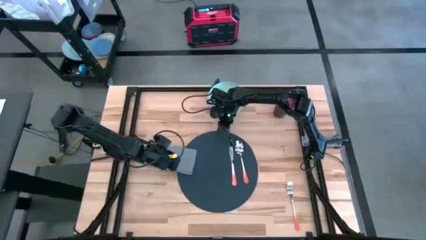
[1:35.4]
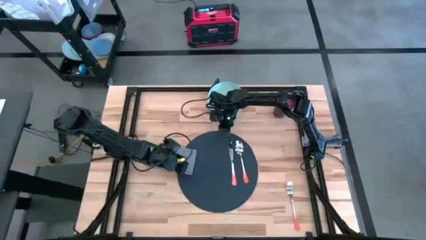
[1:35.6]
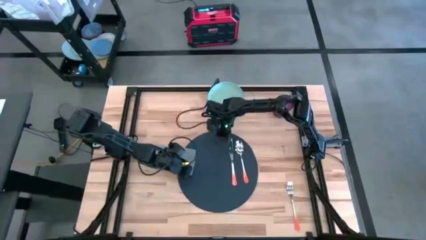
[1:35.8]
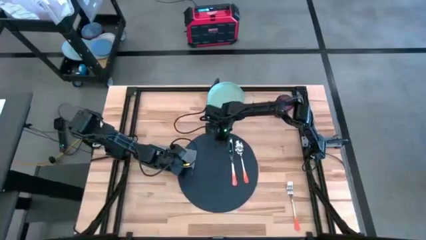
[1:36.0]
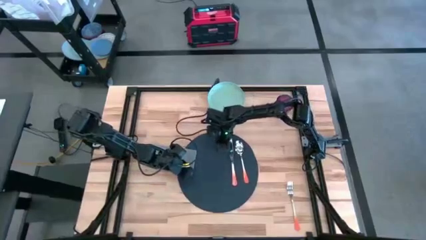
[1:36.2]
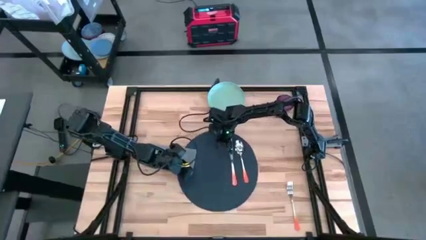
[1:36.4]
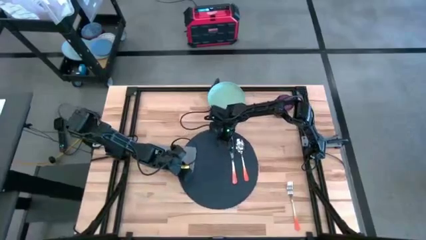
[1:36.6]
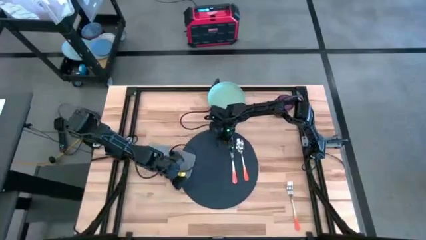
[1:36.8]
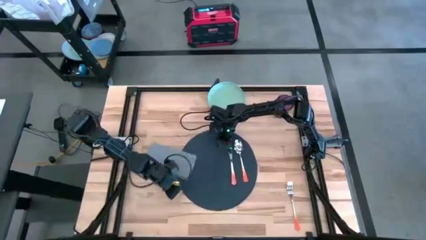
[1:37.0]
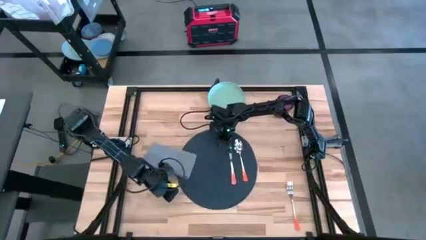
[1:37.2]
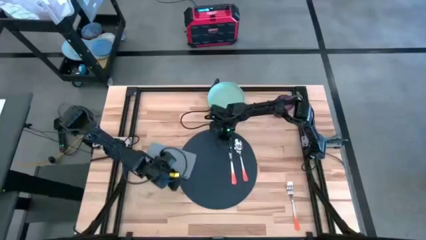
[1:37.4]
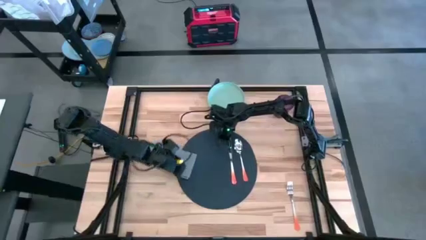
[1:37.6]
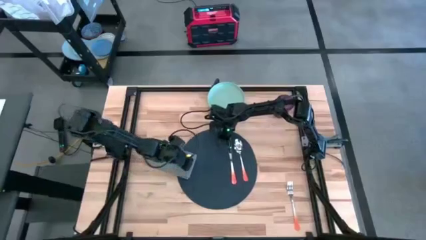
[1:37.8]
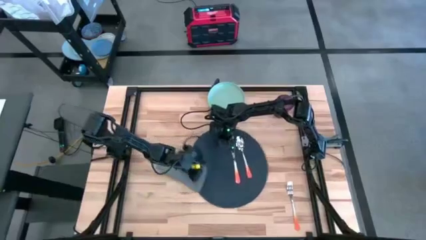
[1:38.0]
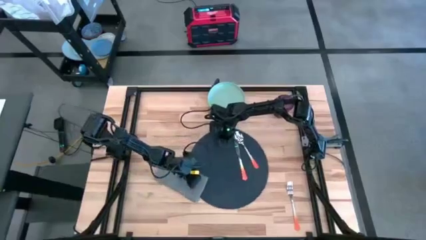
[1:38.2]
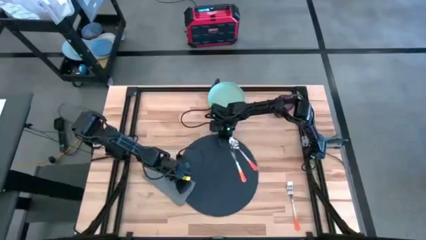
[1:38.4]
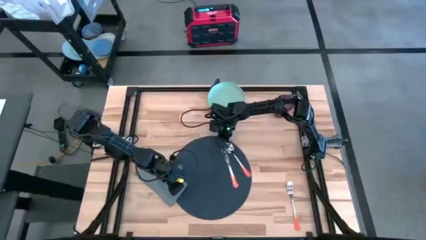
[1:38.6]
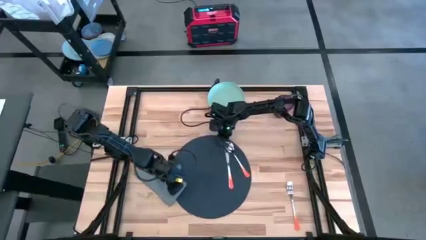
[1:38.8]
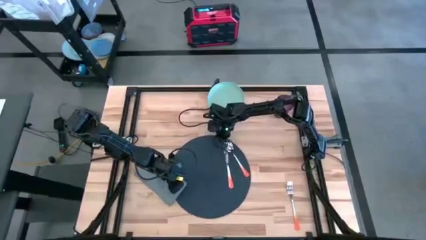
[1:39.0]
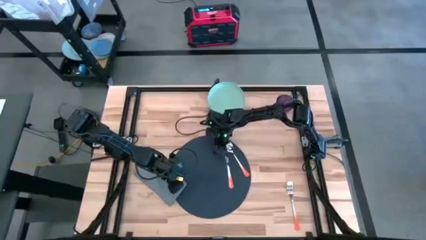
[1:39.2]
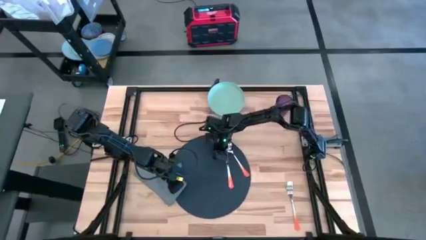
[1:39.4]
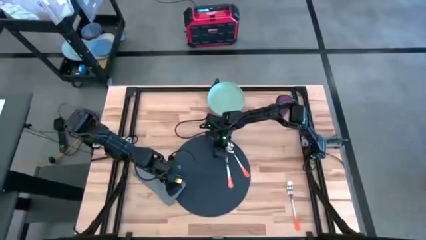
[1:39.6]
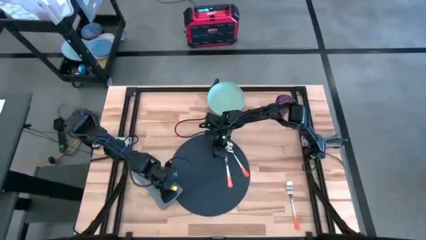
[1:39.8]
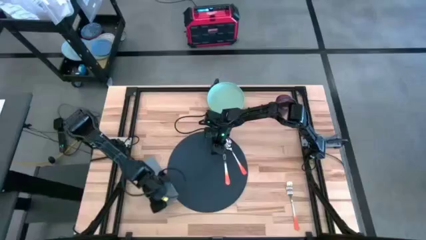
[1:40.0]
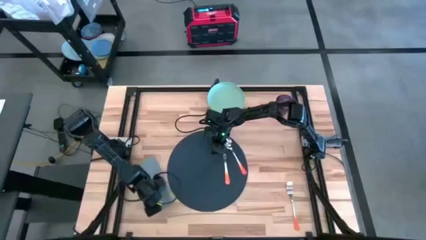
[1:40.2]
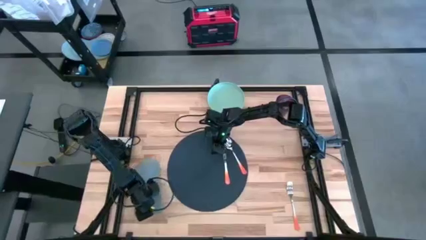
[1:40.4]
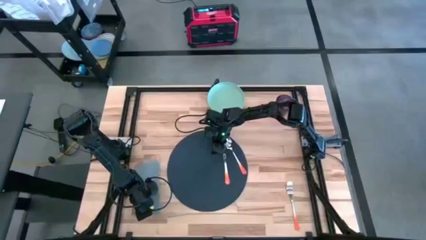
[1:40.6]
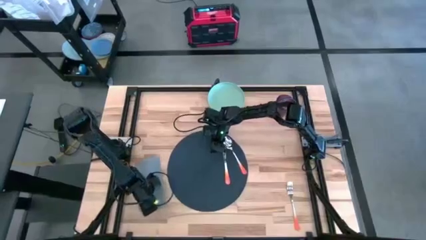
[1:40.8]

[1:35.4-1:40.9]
Task: Set table place
Move the gray napkin to the left of the dark gray placemat

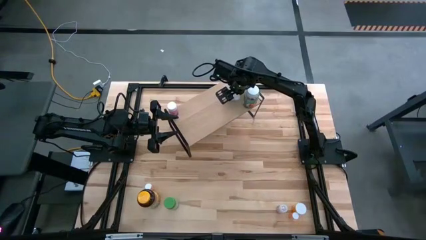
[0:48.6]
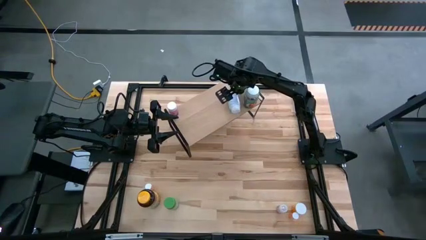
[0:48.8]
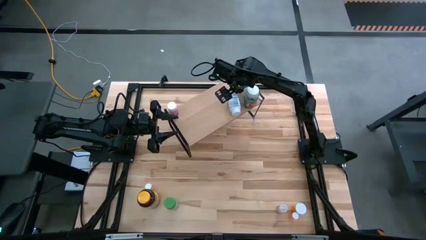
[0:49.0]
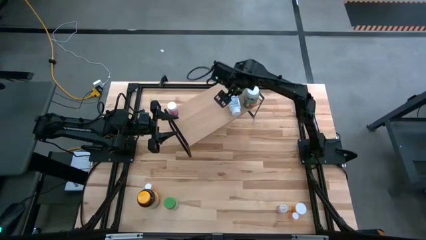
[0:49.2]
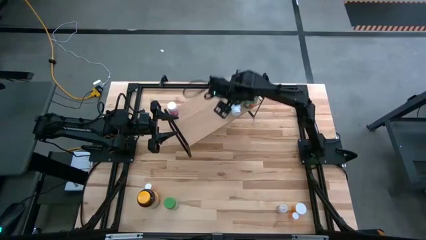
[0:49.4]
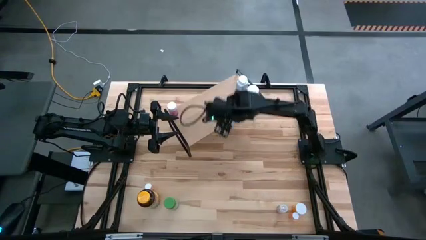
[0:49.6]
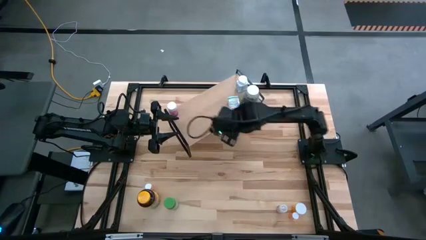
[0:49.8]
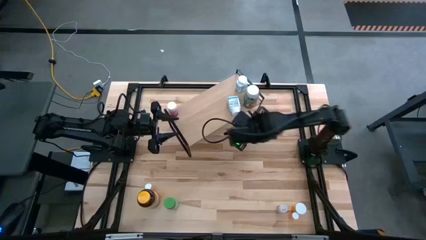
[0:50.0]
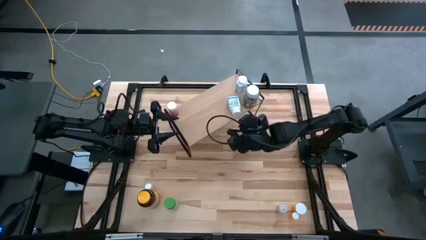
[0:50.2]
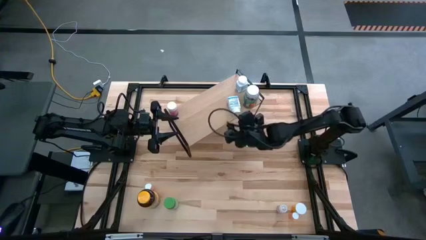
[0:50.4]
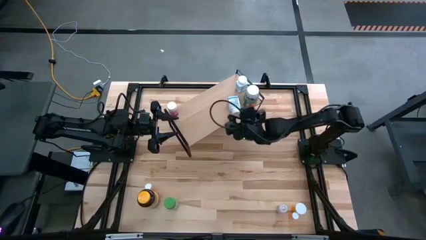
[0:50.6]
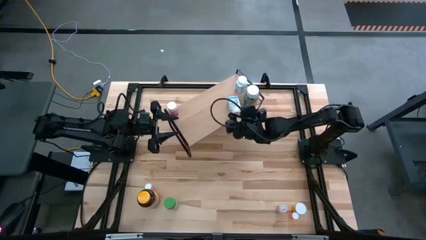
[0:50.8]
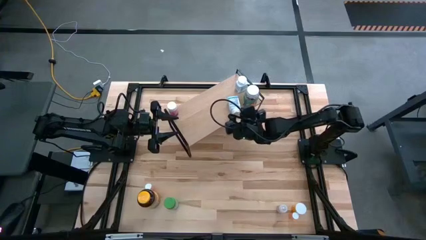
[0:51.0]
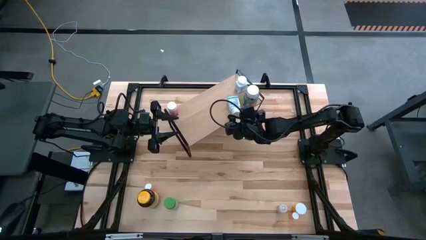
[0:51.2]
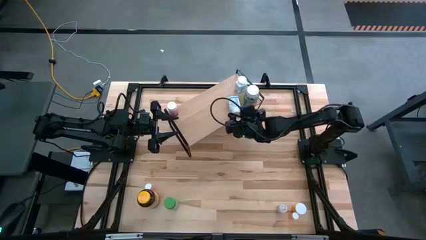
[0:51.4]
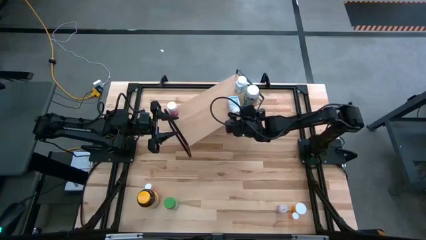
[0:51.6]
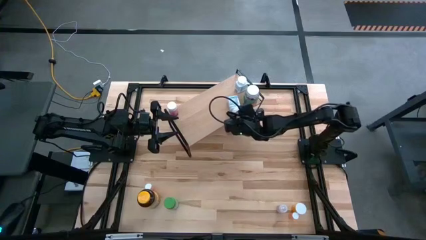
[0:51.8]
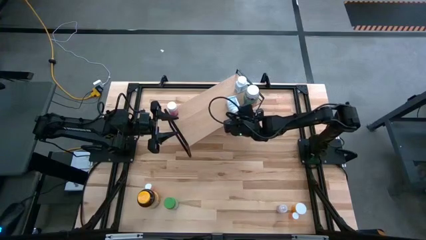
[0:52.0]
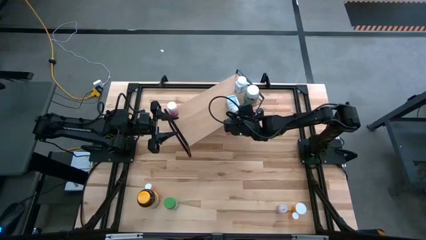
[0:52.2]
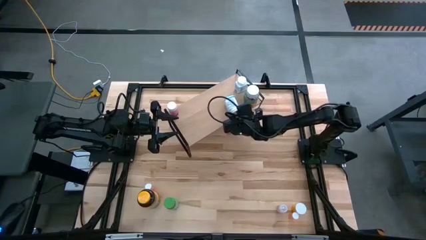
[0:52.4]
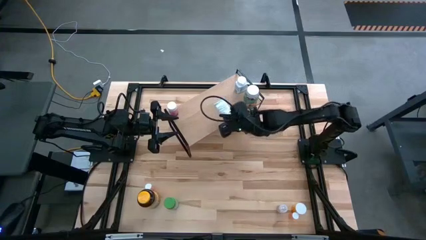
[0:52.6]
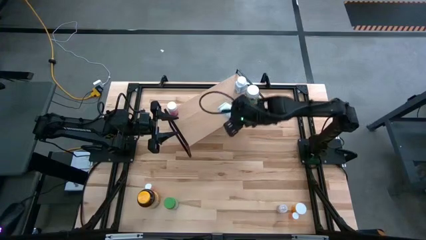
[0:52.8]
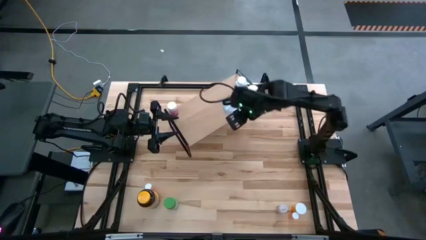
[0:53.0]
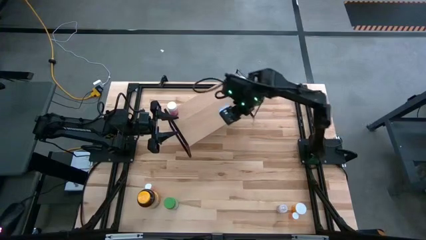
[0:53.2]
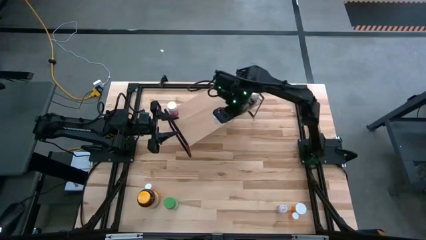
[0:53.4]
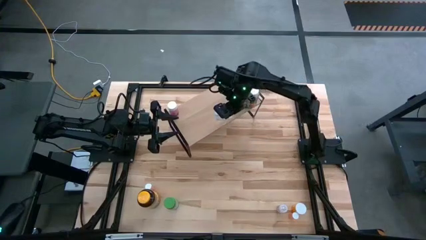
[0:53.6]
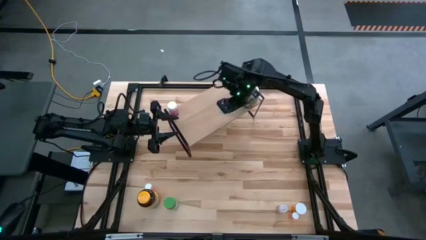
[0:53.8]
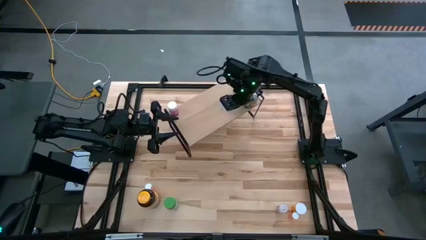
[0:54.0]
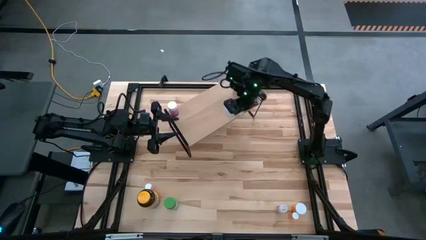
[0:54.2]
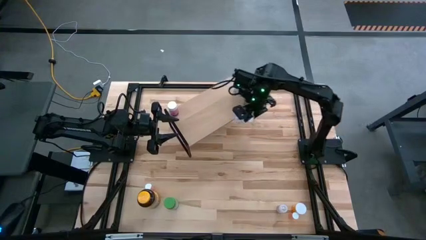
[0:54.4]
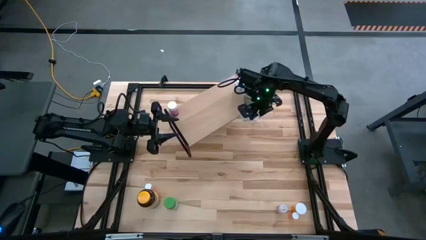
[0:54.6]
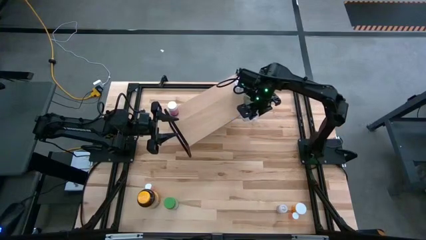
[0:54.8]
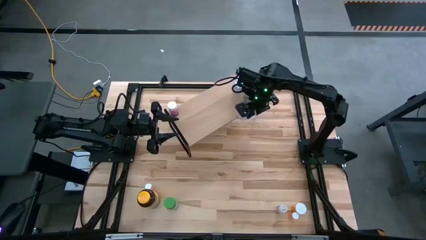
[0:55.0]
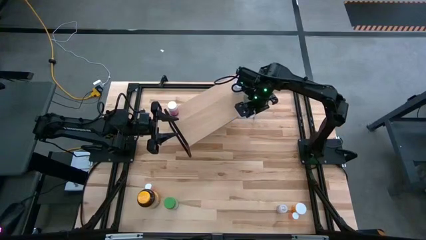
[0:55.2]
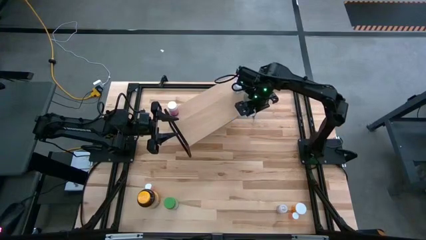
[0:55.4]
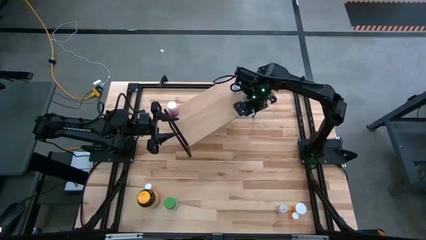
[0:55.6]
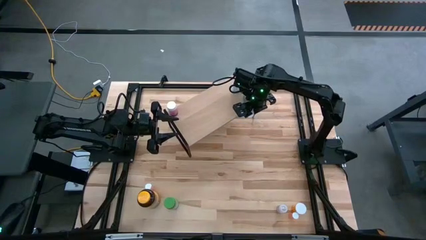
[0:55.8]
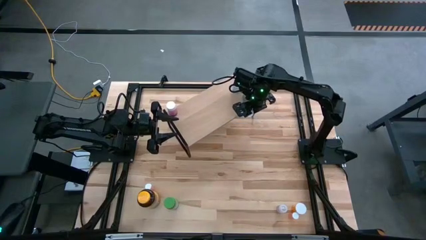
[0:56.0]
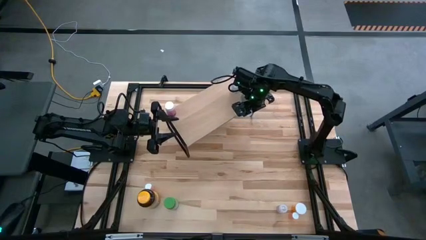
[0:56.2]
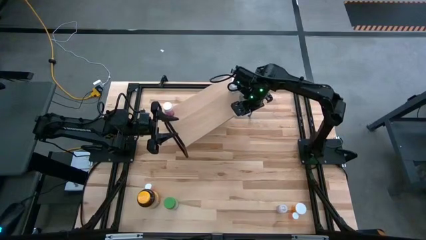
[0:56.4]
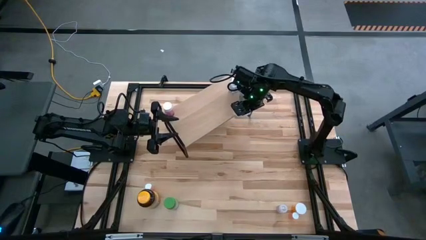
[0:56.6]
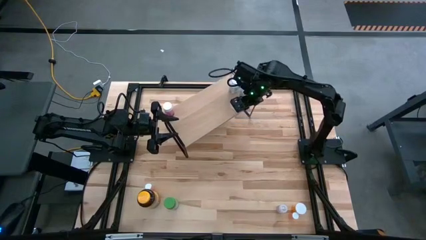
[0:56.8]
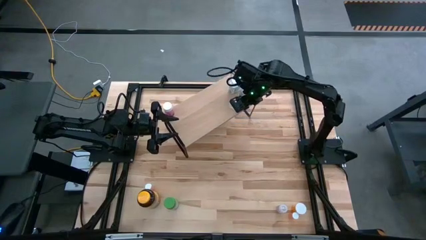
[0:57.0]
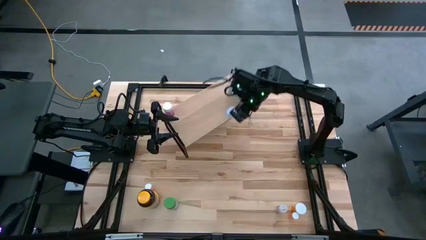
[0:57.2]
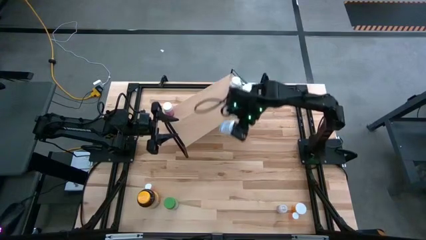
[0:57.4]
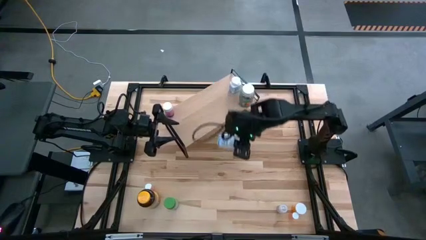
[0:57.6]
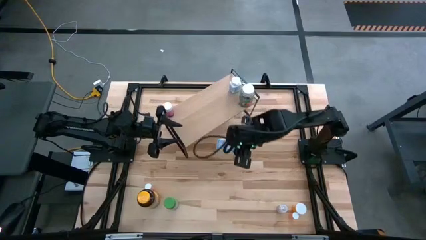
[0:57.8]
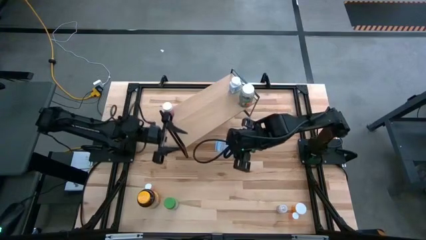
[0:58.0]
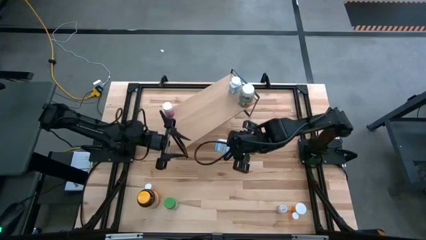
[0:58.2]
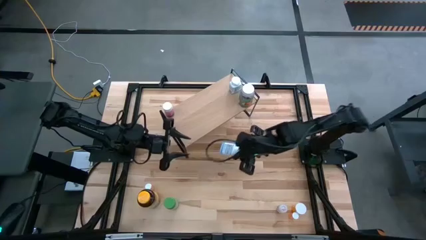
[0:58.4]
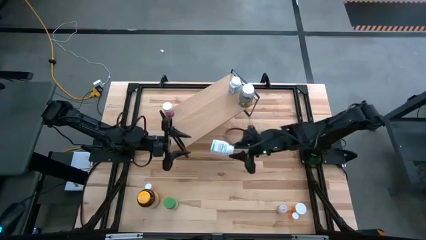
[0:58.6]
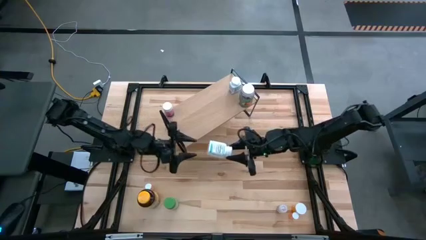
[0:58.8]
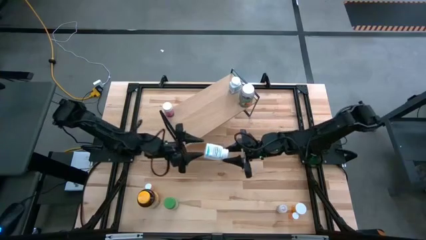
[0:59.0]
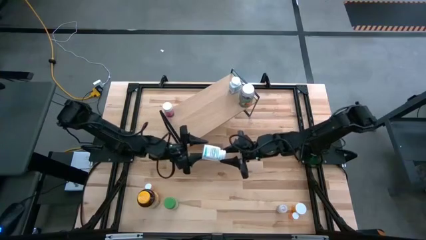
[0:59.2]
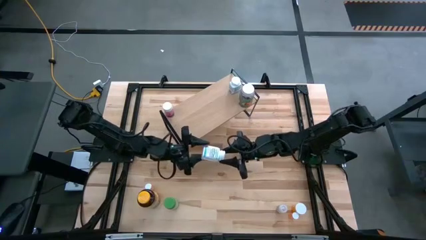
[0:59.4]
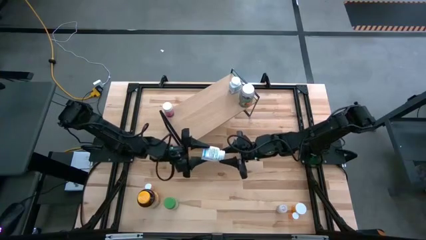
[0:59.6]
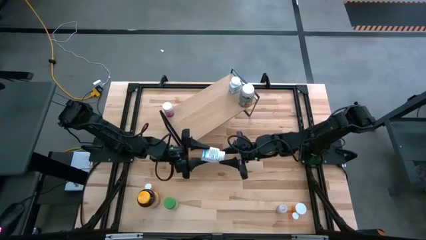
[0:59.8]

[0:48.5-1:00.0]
Task: Pick and place medicine bottles onto shelf by color
Put the blue bottle on the shelf
